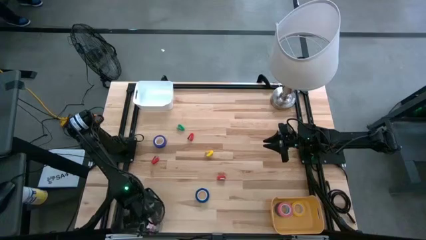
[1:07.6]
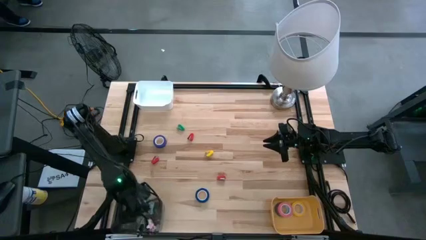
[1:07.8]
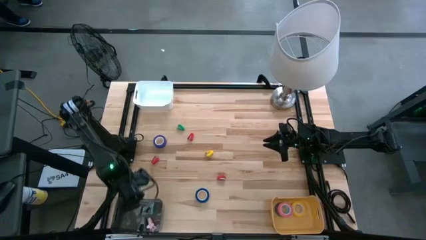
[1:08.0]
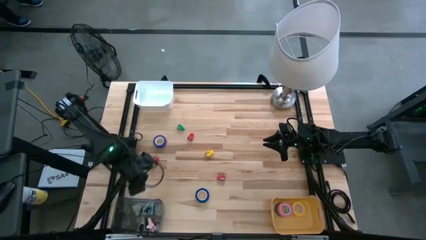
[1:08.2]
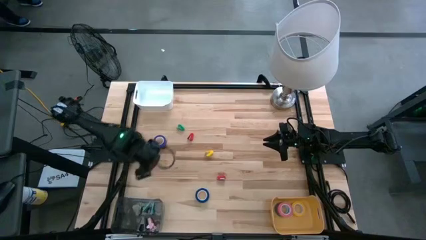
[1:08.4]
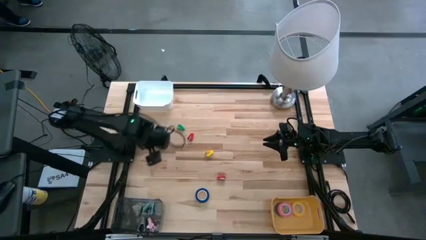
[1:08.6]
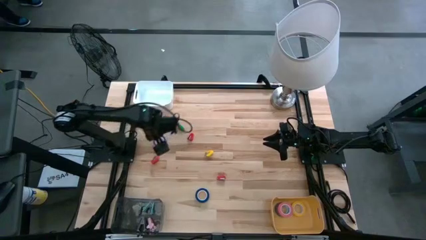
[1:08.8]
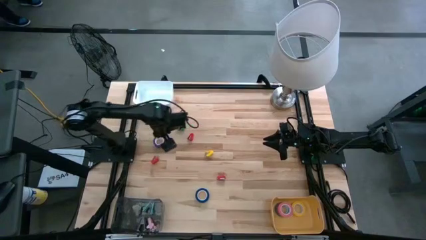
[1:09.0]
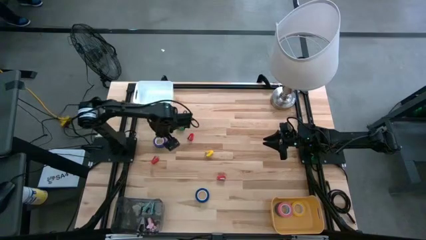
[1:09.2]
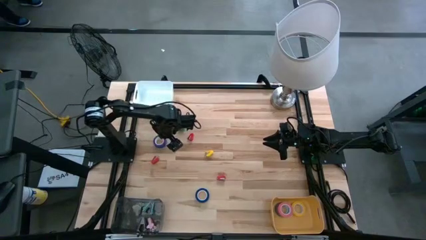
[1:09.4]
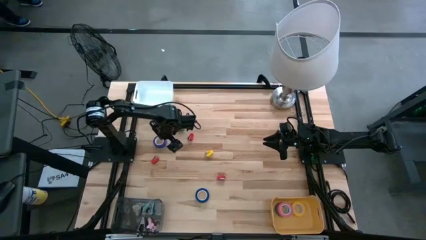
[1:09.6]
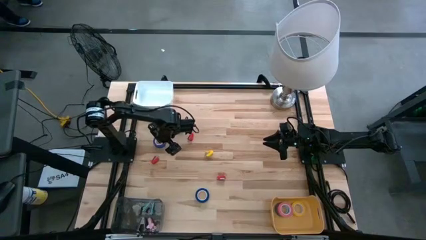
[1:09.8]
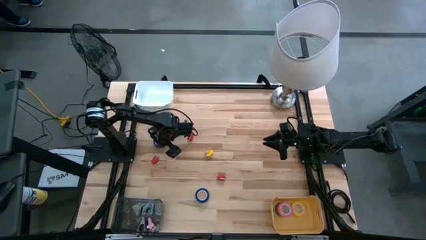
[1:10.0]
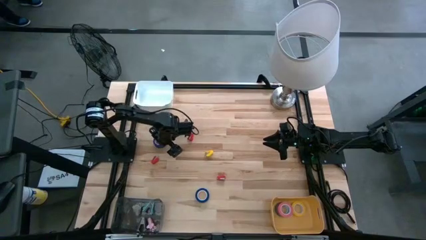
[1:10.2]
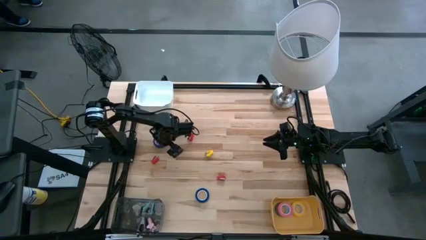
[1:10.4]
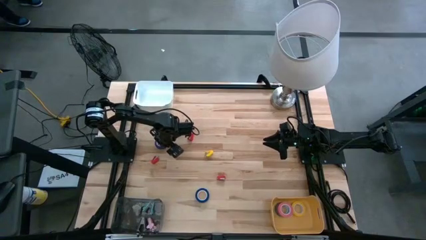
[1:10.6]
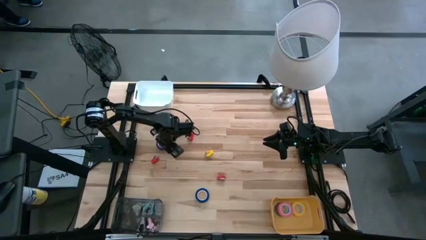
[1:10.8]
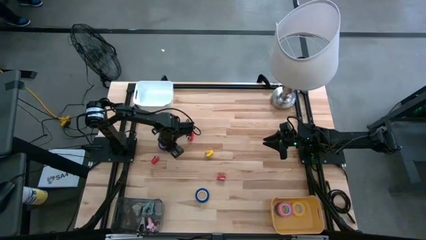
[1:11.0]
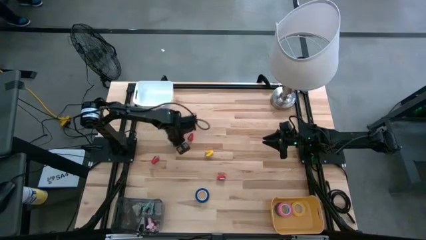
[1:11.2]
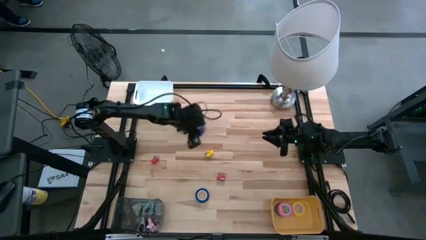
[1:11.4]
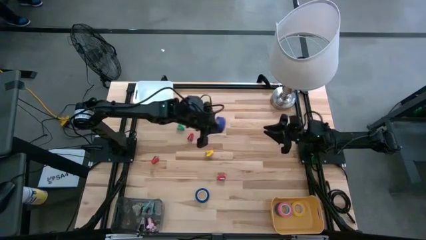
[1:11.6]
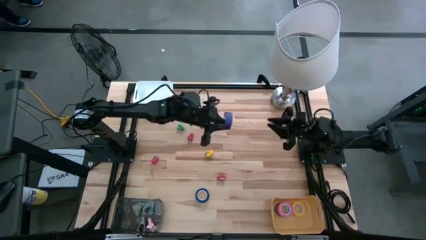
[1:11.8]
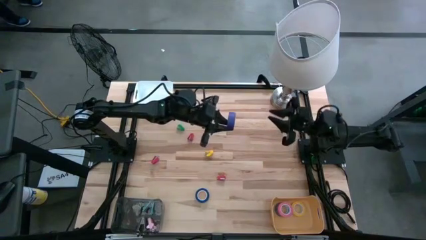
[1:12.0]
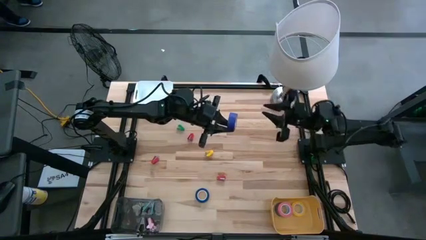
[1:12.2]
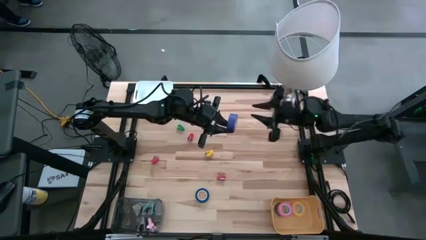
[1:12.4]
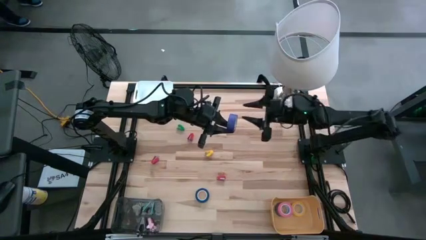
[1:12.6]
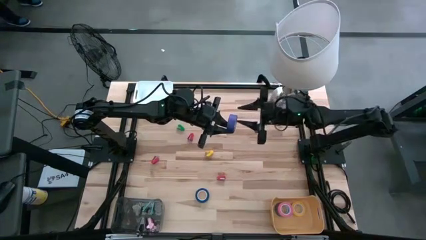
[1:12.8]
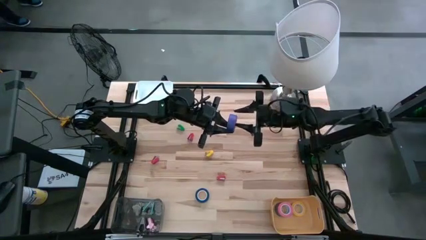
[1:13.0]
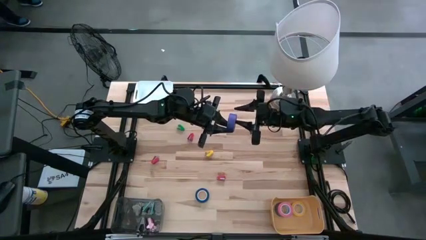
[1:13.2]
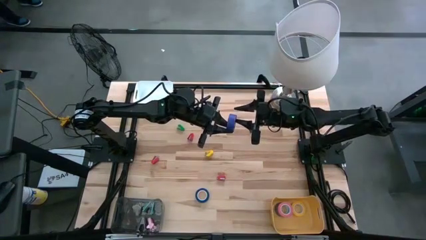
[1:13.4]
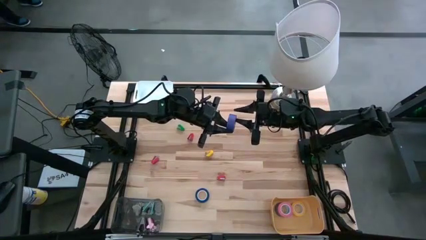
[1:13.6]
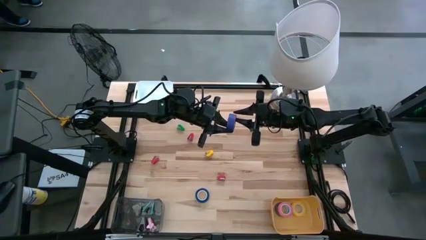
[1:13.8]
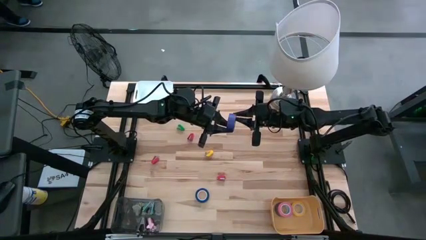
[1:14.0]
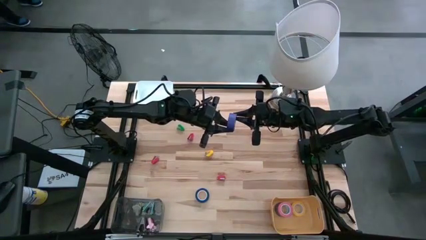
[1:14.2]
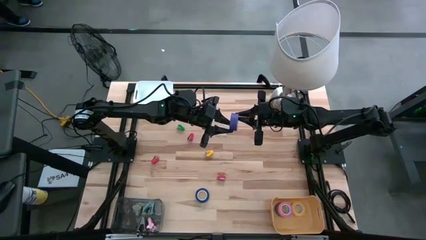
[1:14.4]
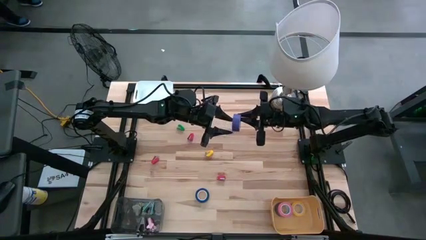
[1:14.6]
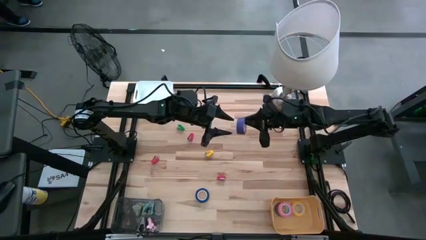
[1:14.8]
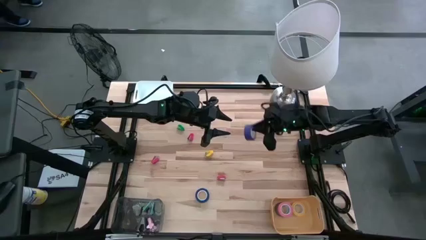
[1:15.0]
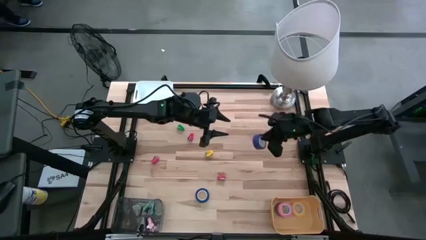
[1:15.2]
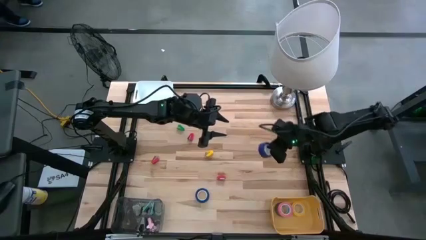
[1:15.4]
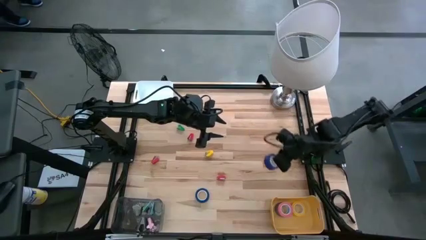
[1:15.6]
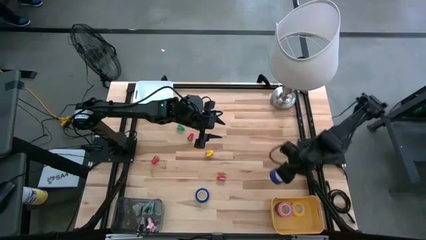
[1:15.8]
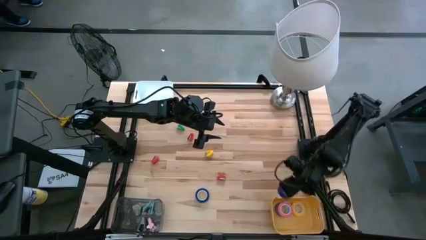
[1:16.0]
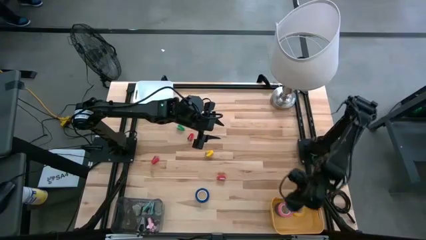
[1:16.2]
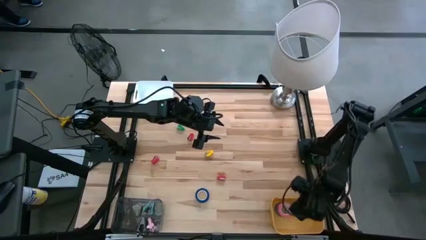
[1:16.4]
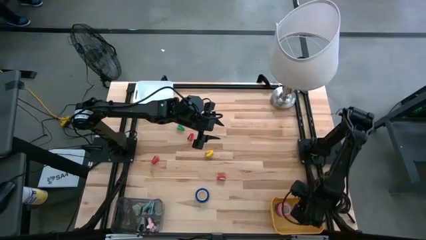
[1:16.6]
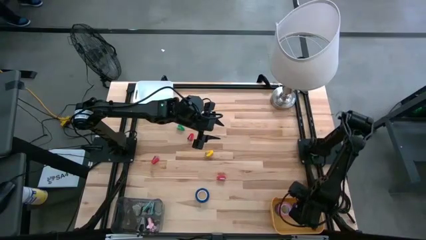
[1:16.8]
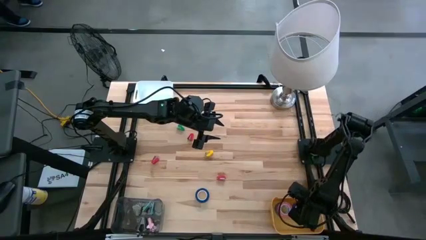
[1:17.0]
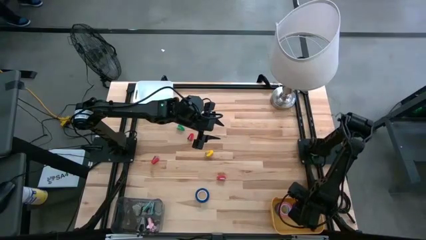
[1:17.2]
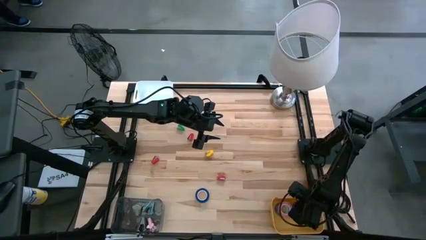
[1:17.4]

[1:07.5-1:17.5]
Task: Pick and place Stapler, Stapler remover, tape
Put the violet tape into the yellow bin

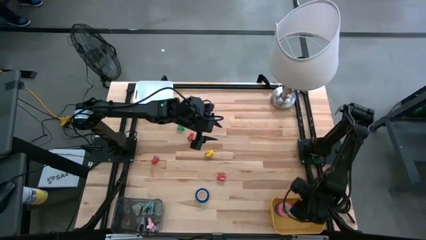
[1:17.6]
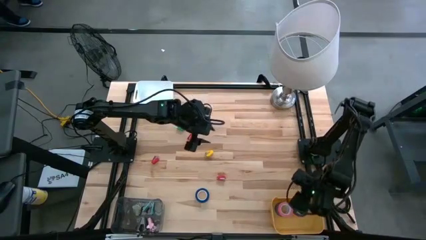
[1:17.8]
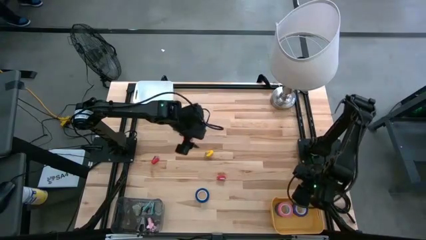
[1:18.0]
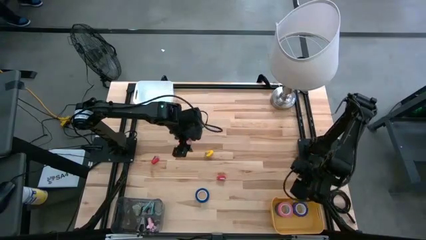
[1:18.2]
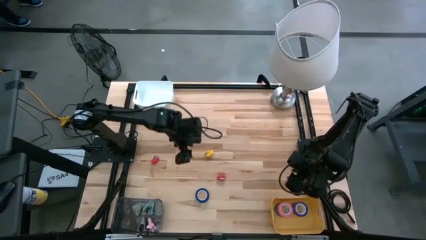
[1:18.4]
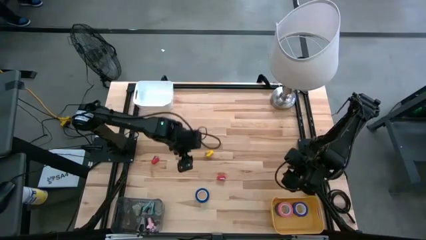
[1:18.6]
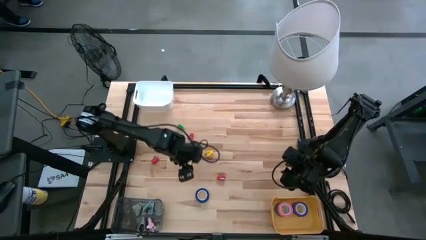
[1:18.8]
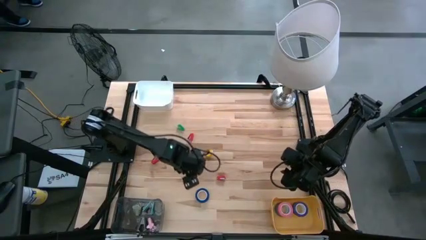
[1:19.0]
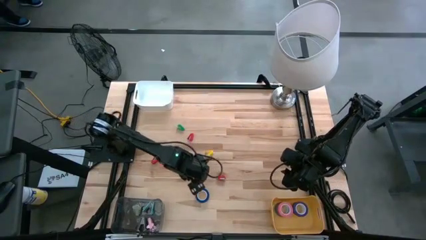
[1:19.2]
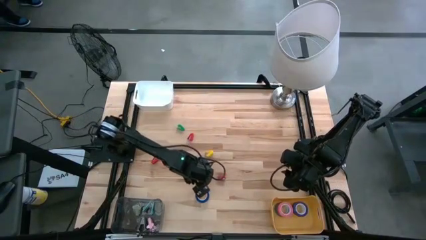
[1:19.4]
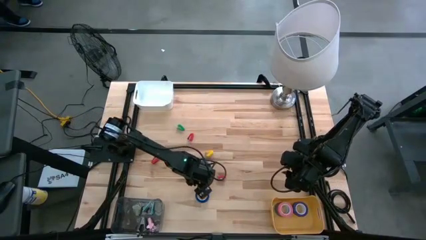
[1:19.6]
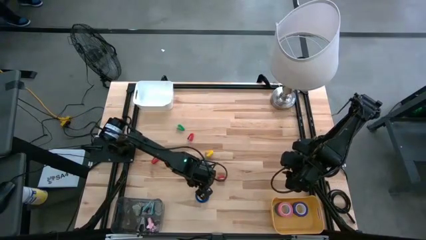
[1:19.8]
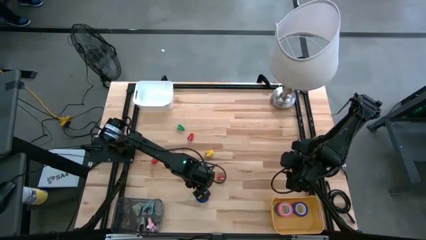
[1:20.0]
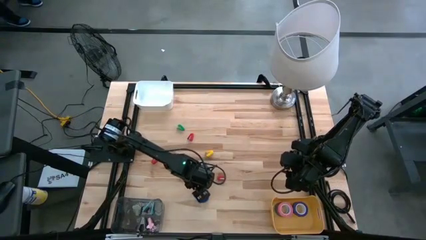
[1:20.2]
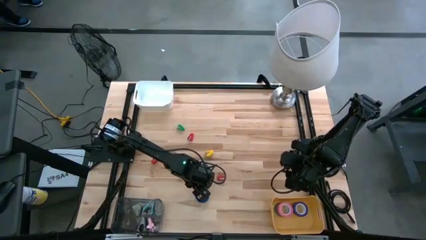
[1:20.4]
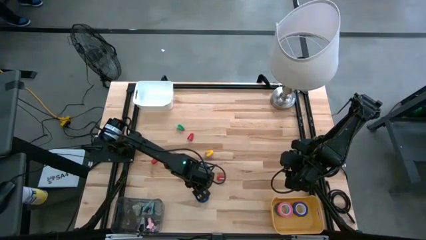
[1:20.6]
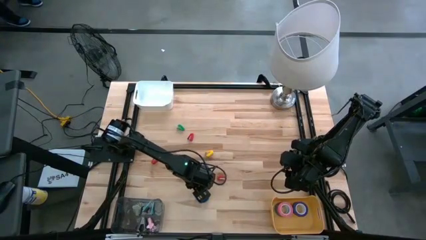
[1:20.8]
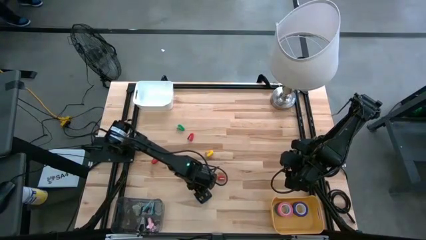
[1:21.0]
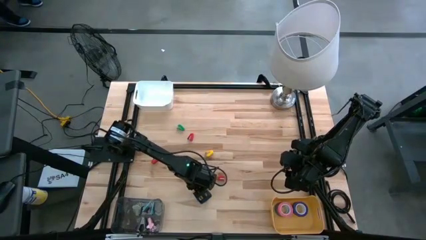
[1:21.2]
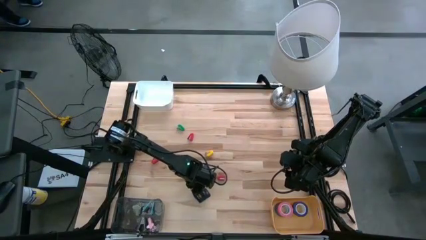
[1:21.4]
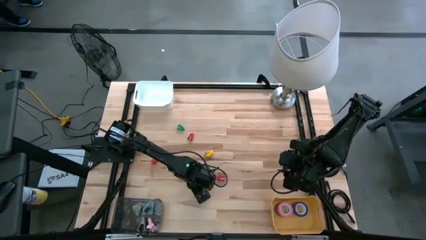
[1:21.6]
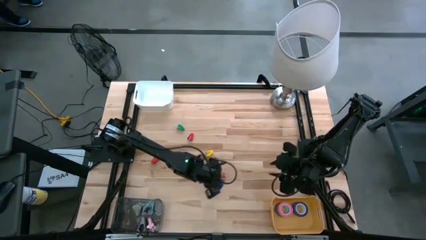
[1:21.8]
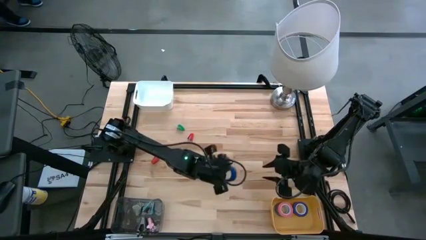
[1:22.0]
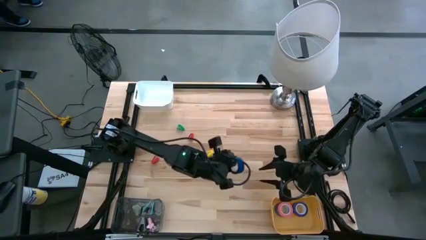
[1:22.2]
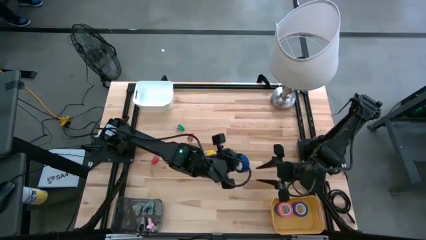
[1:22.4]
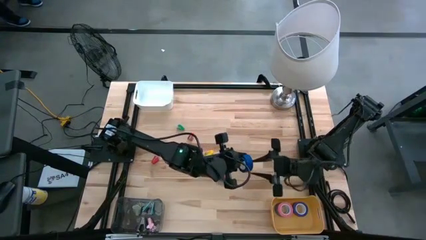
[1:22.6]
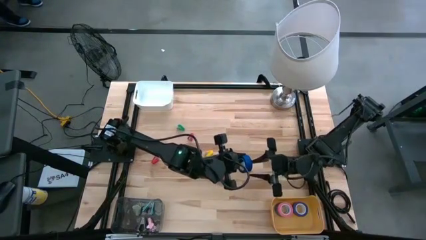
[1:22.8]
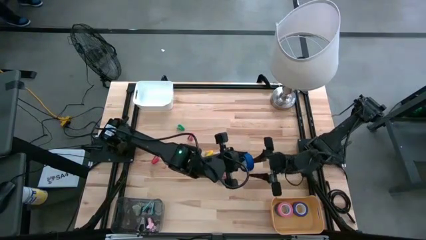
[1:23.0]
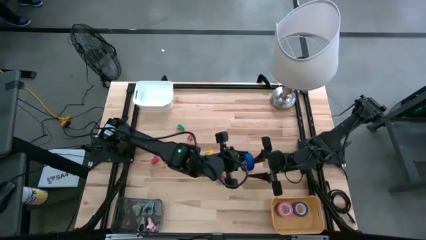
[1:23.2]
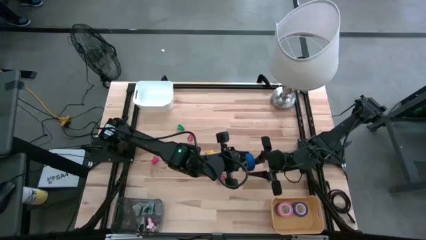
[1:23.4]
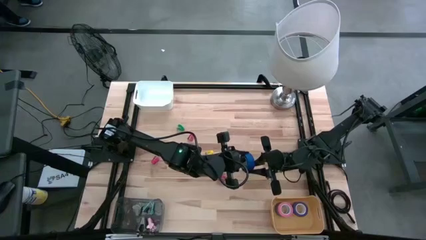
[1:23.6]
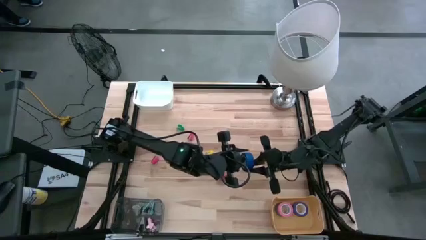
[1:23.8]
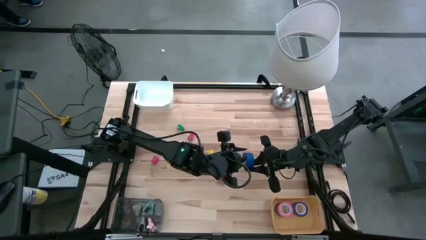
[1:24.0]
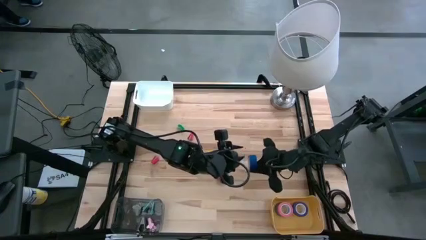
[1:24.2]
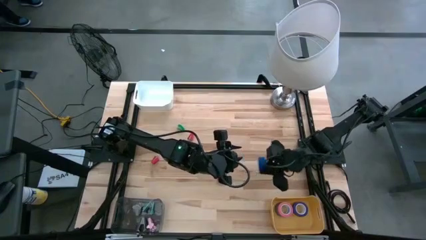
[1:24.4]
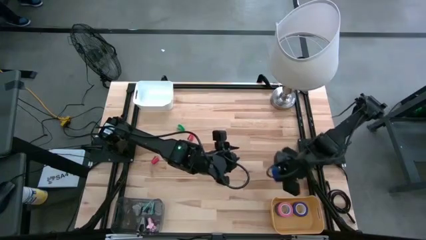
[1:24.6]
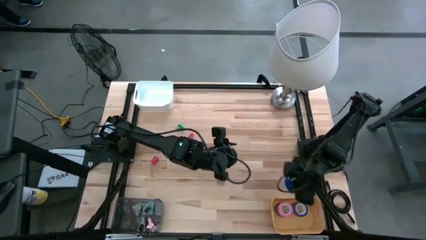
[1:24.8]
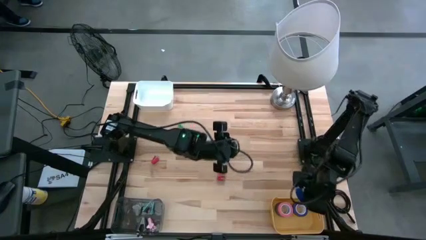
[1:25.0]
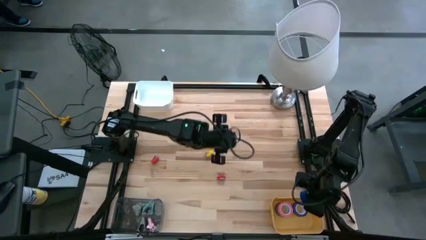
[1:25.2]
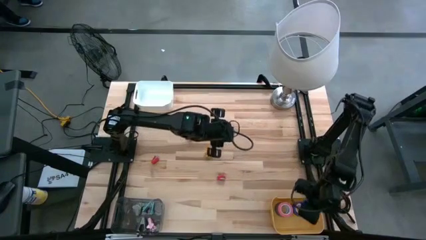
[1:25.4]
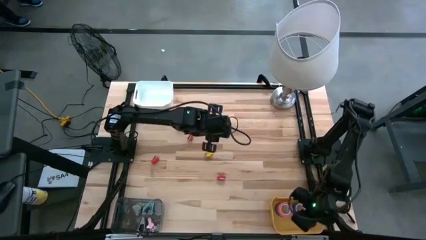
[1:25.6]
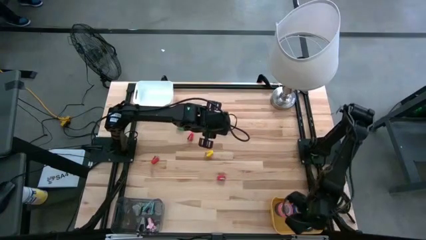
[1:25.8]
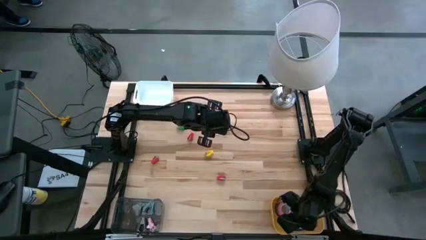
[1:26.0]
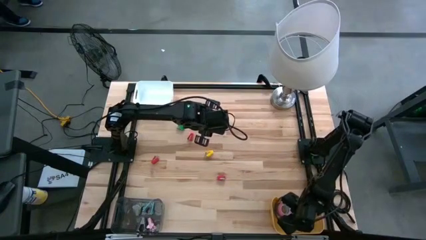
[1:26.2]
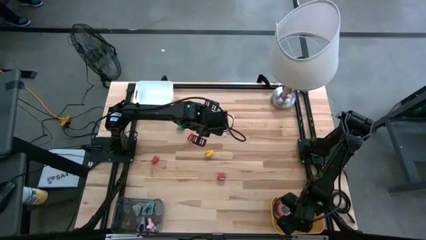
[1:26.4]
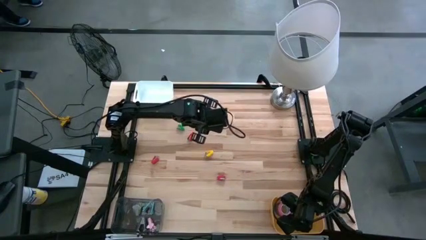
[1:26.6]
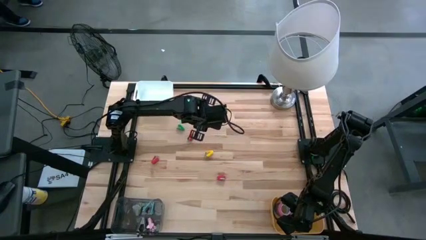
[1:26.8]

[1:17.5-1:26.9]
Put the dark blue tape into the yellow bin
